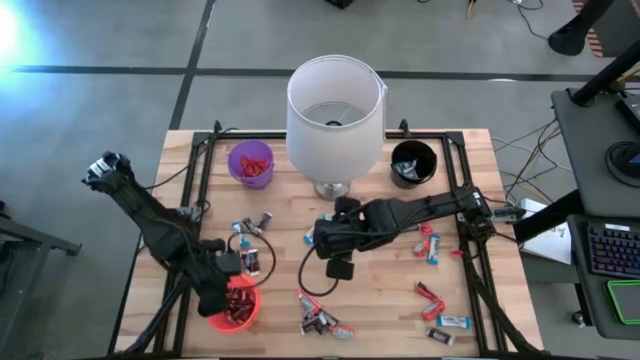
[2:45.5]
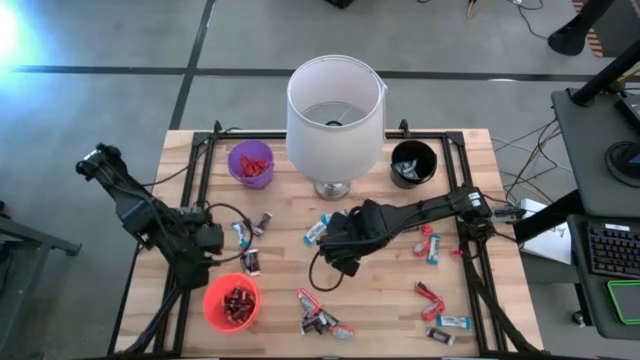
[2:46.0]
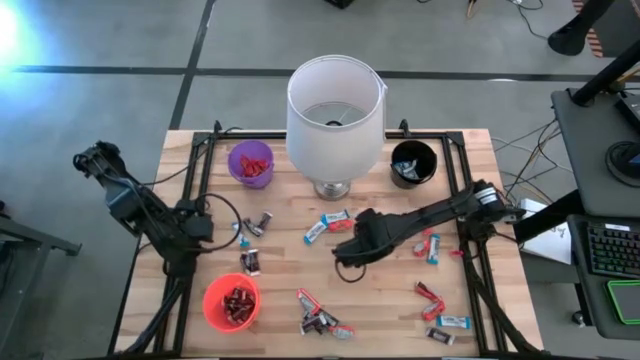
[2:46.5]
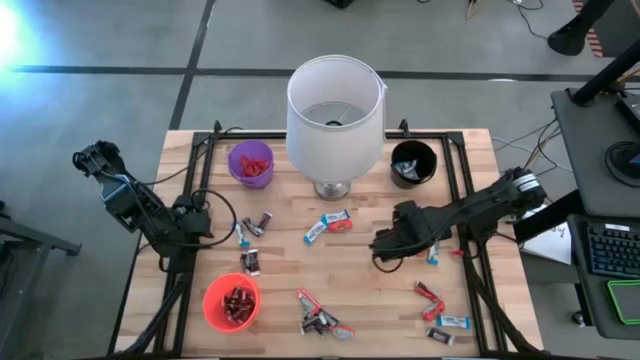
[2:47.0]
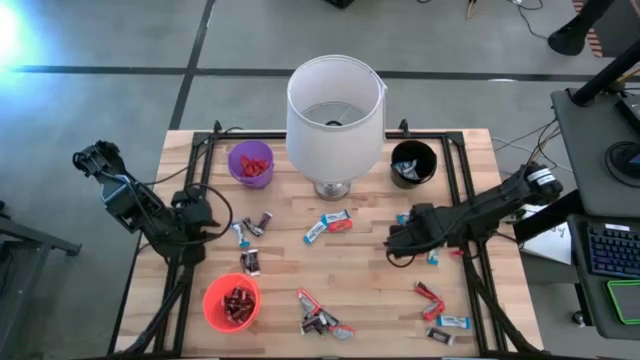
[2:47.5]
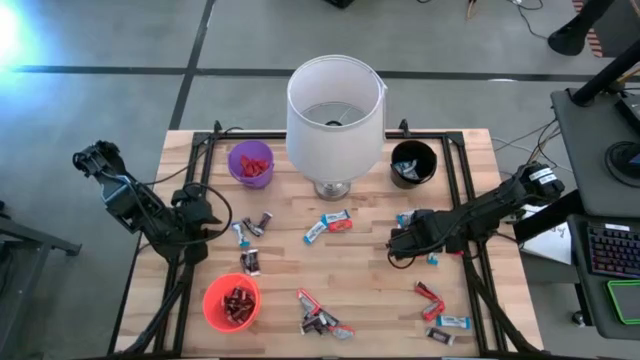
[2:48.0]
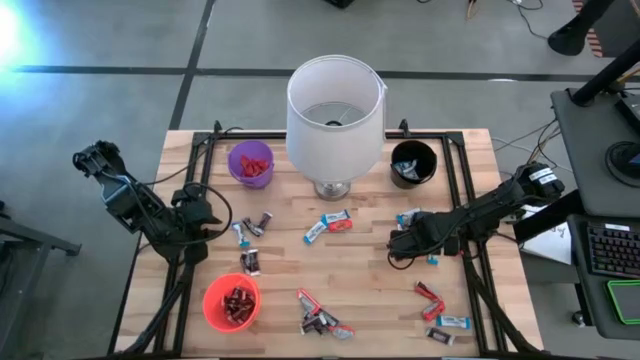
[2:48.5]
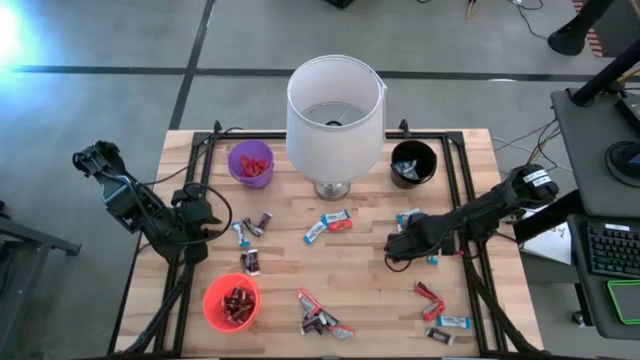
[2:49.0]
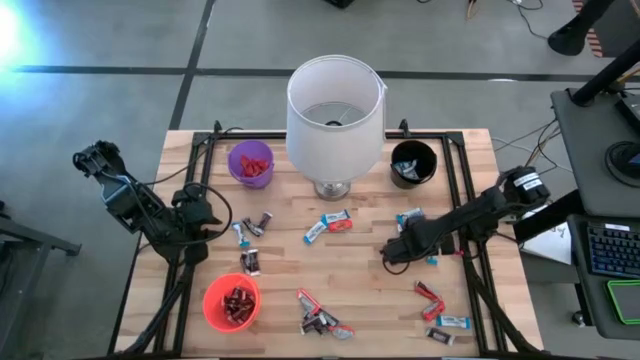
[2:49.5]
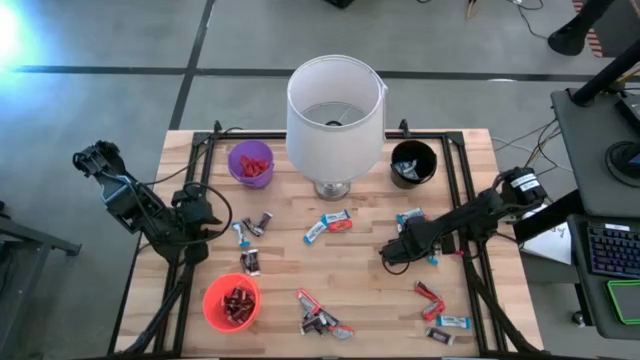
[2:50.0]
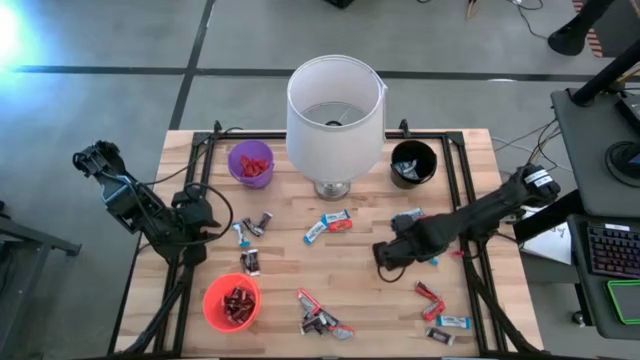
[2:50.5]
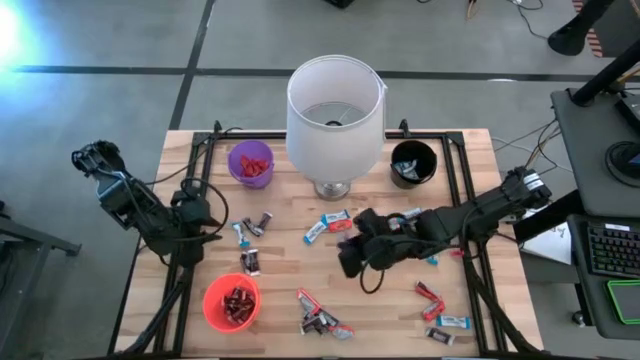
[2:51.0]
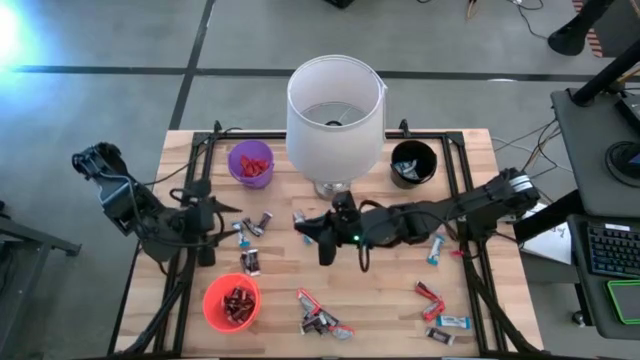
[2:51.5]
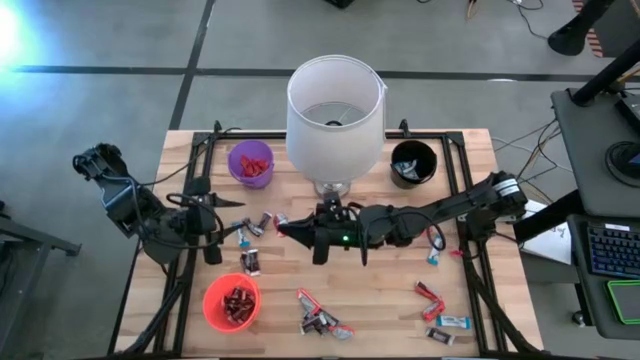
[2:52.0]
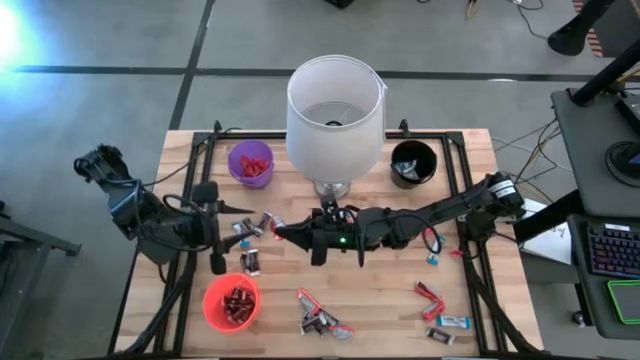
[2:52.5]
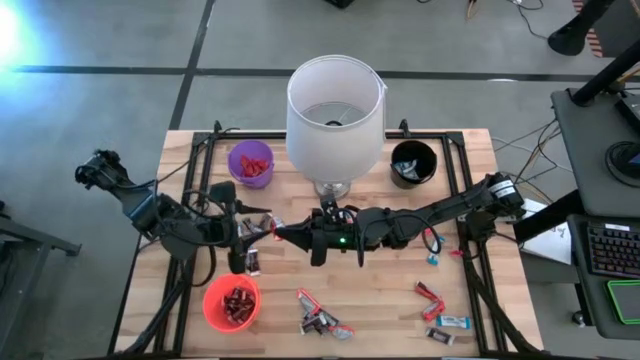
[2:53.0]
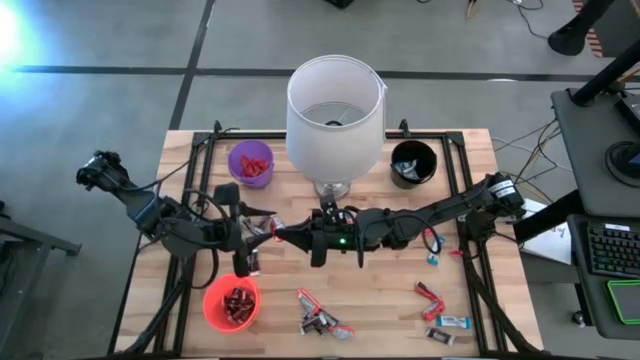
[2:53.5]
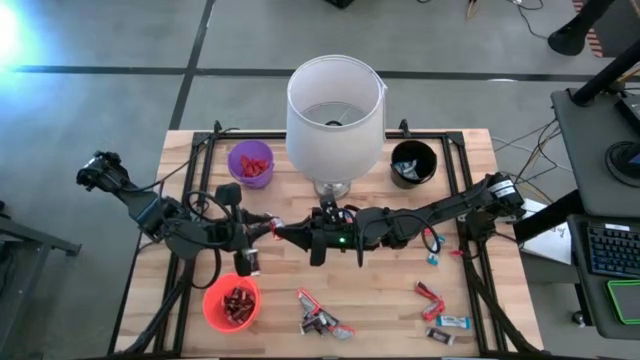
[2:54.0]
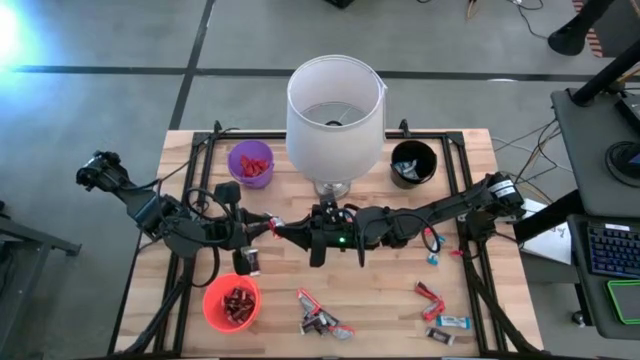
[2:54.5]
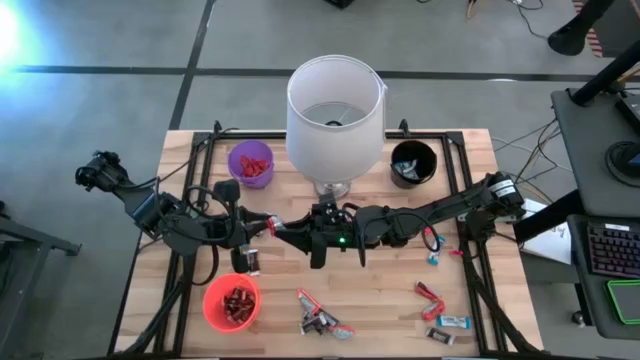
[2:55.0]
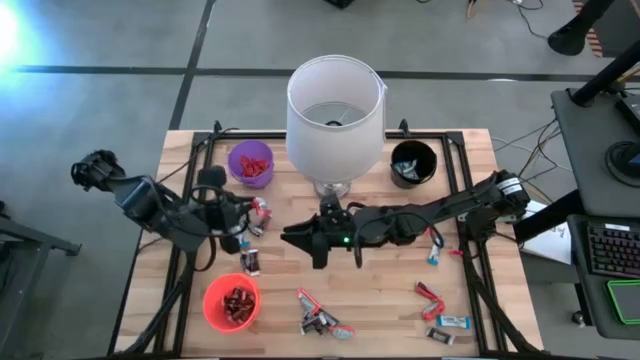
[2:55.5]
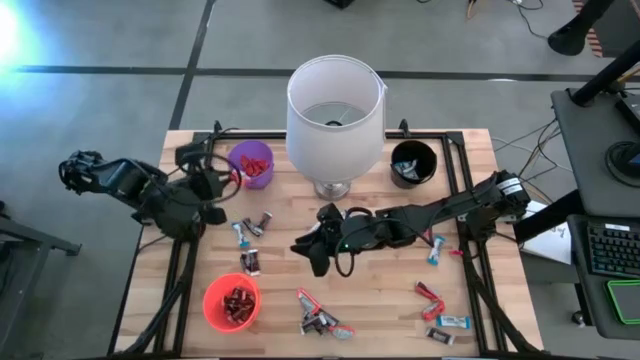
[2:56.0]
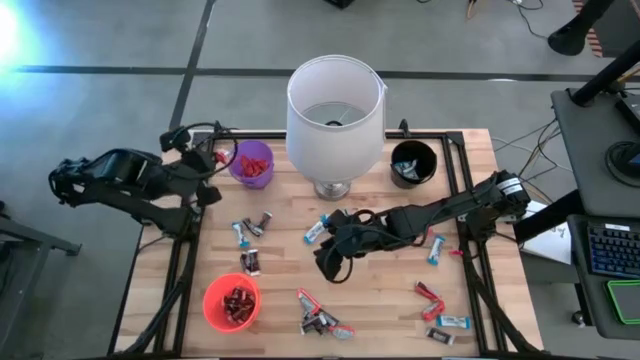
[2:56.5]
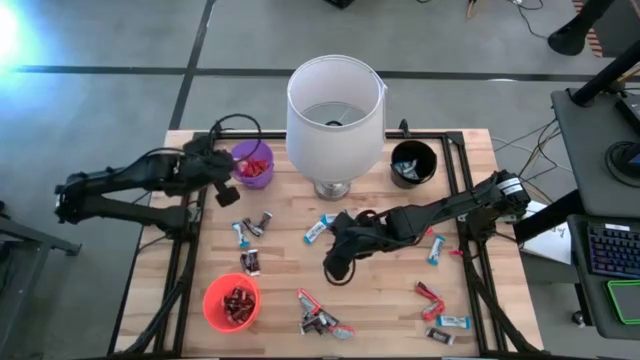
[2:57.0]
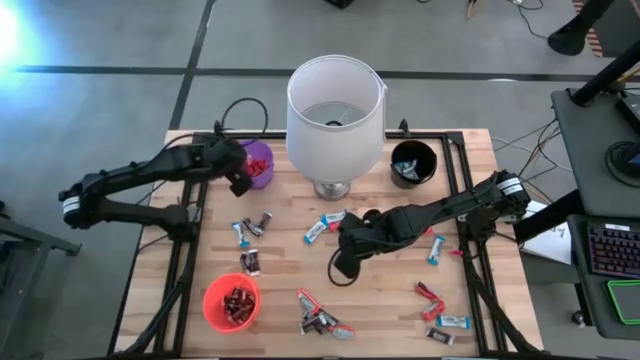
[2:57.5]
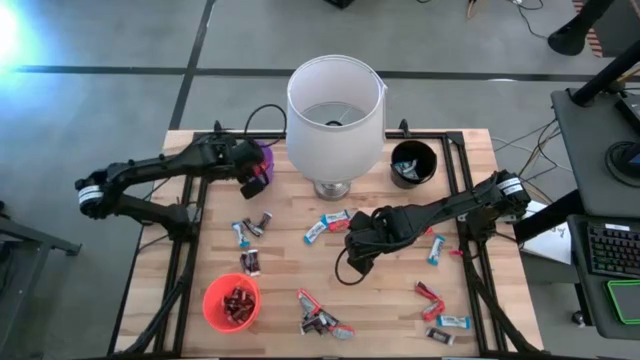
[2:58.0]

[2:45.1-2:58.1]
Task: Sort candy
Put the orange chocolate into the purple bucket

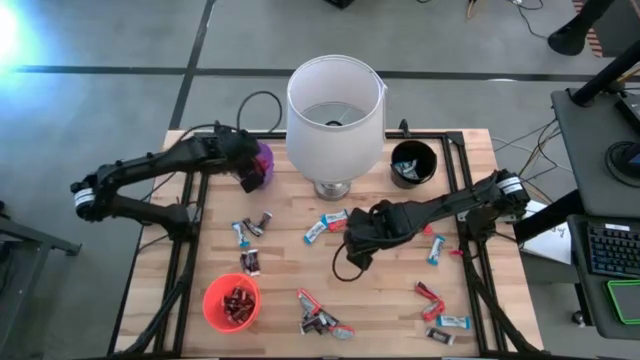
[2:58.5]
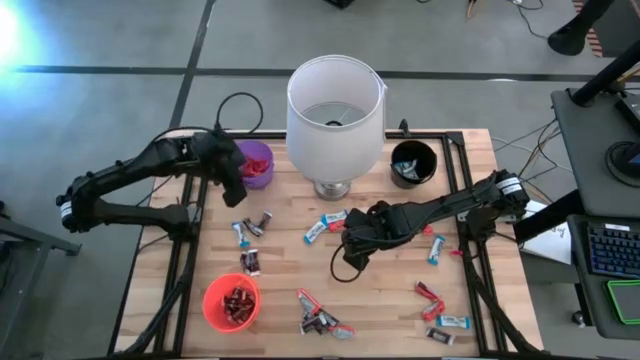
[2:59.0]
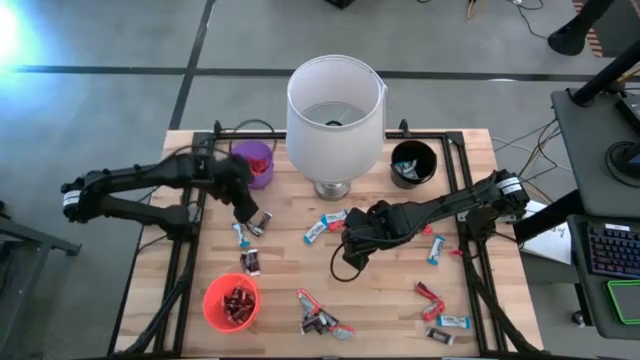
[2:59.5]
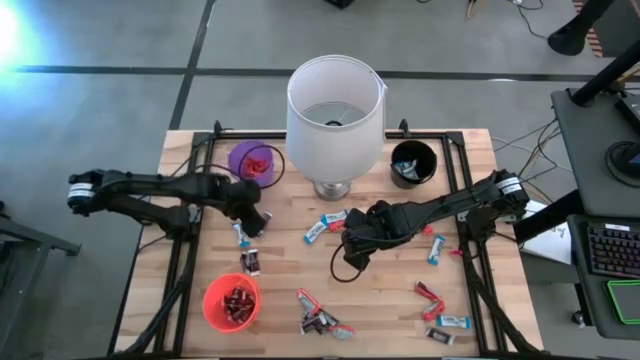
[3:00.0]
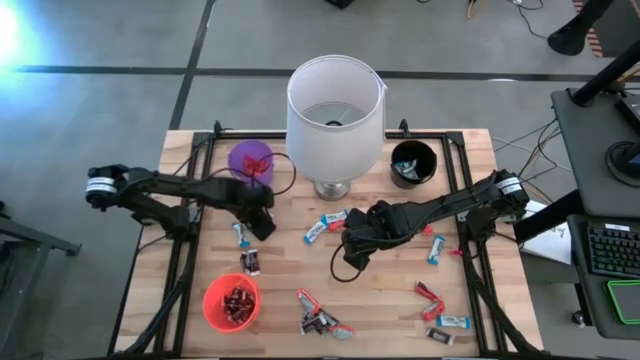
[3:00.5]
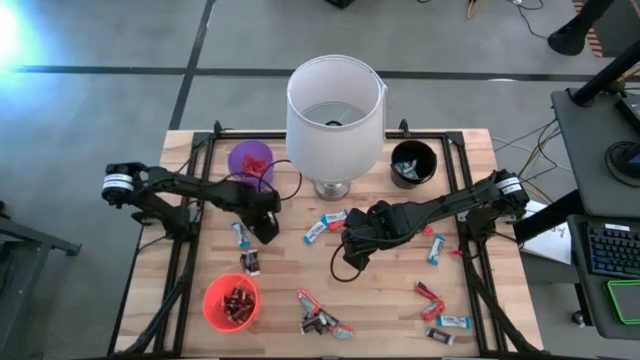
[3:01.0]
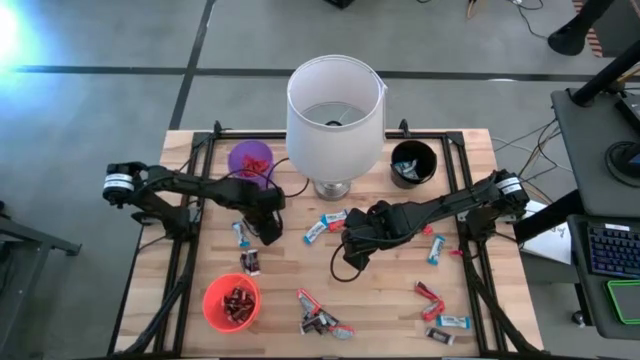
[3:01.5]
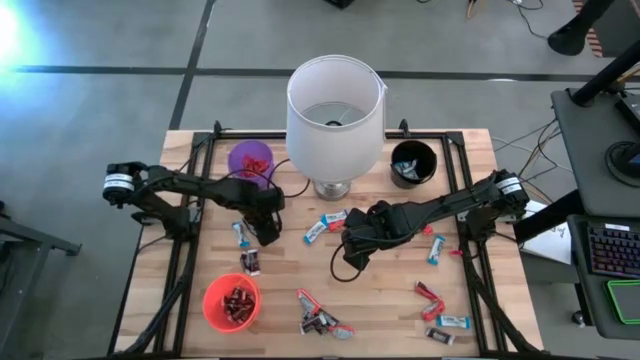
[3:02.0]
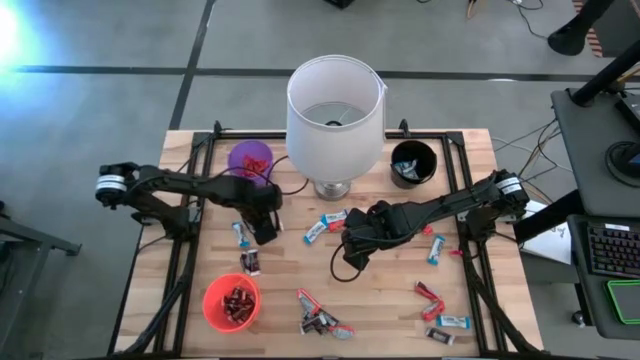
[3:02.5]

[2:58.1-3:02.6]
Put the black chocolate into the orange bucket

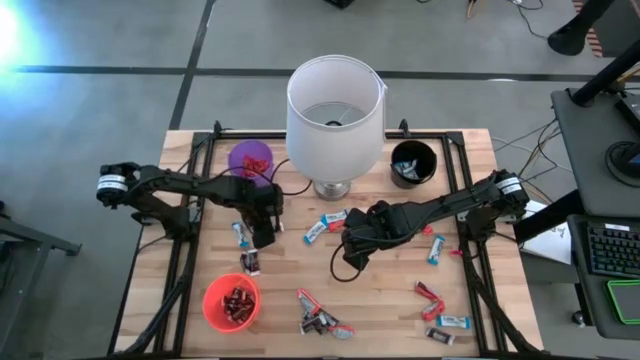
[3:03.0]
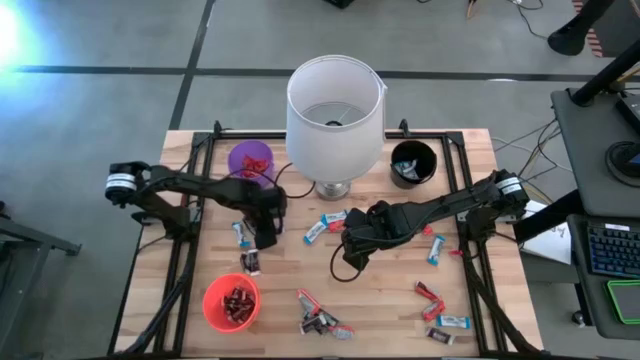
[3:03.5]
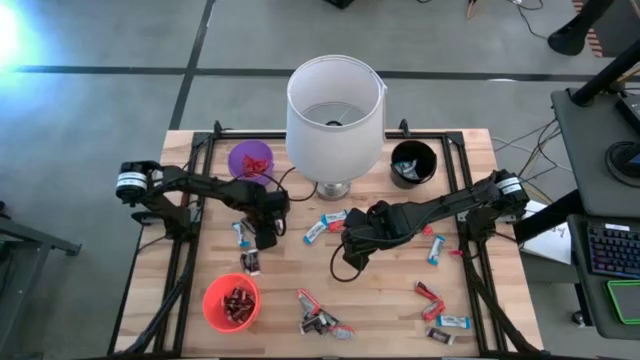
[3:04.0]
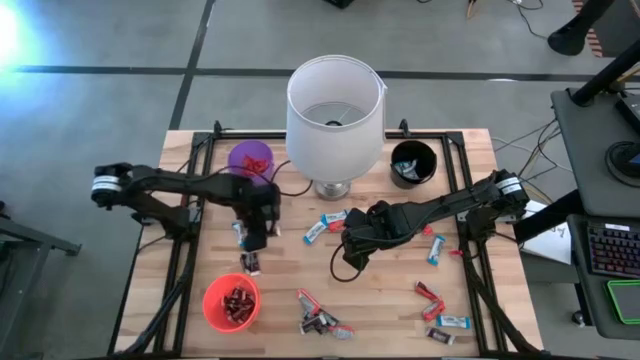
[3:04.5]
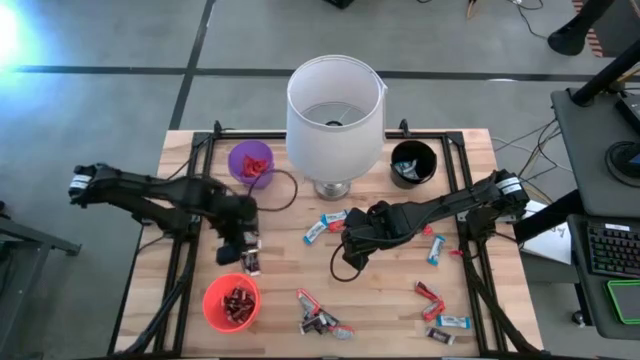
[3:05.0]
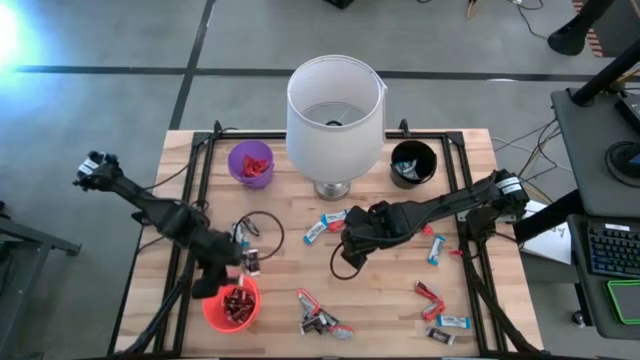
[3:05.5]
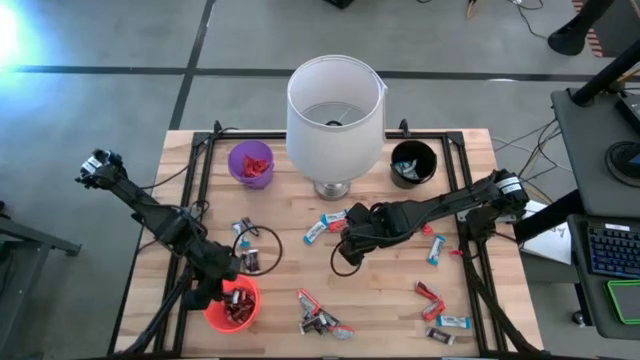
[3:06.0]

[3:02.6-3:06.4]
Put the black chocolate into the orange bucket
